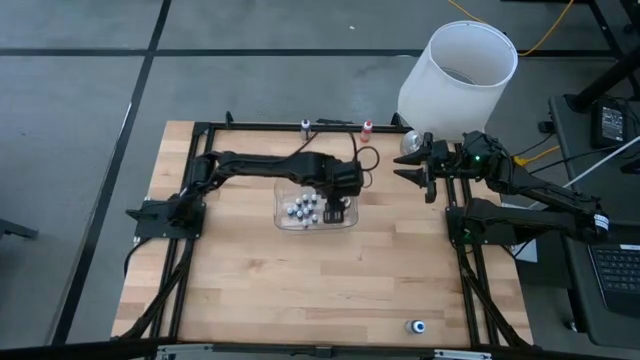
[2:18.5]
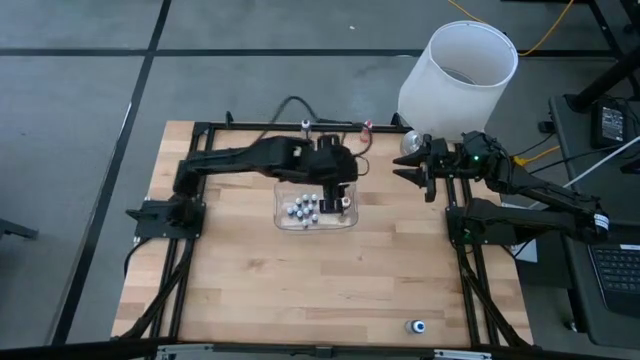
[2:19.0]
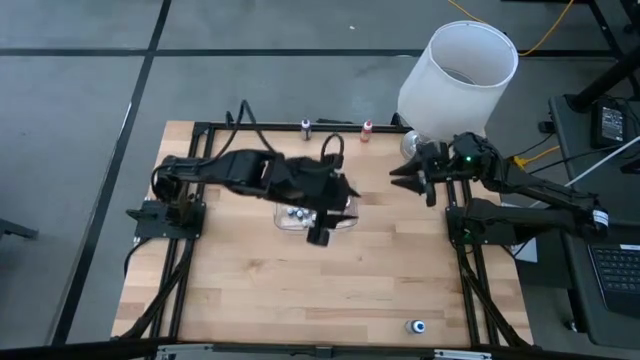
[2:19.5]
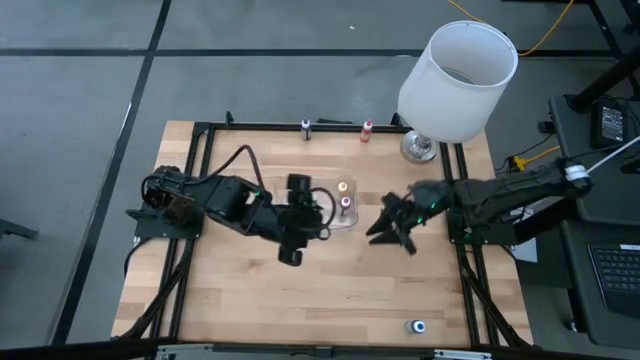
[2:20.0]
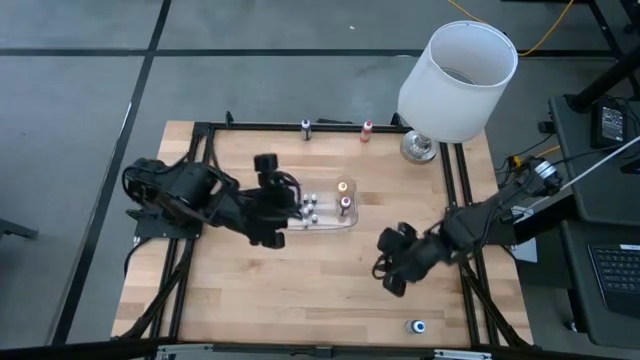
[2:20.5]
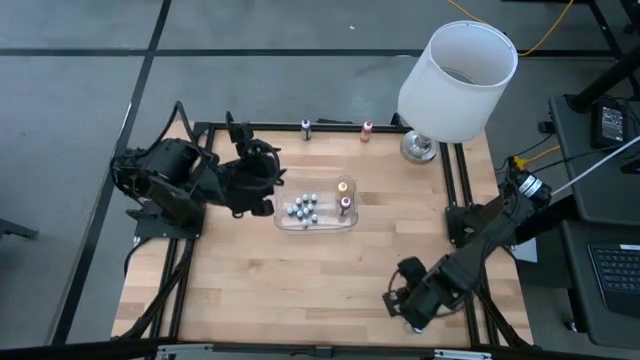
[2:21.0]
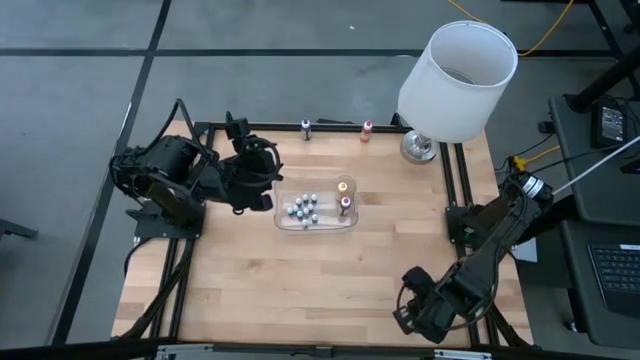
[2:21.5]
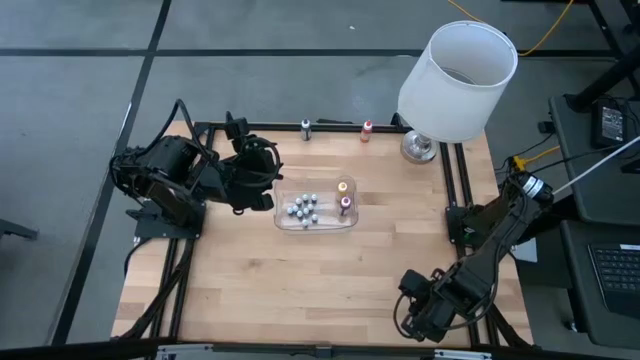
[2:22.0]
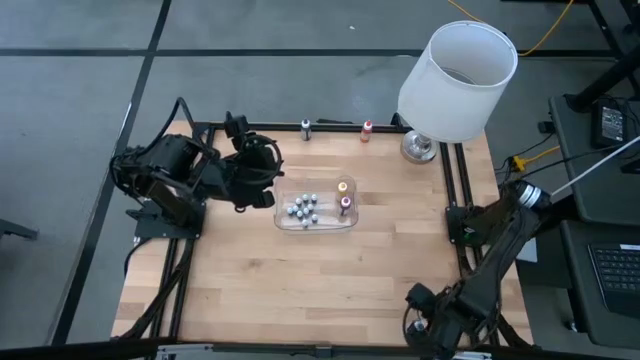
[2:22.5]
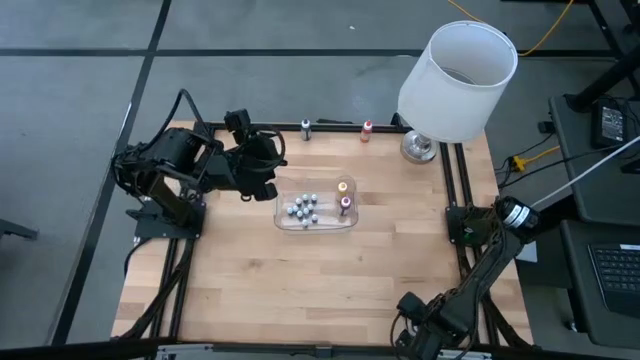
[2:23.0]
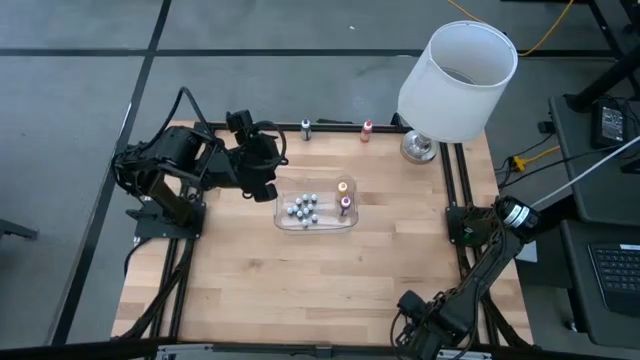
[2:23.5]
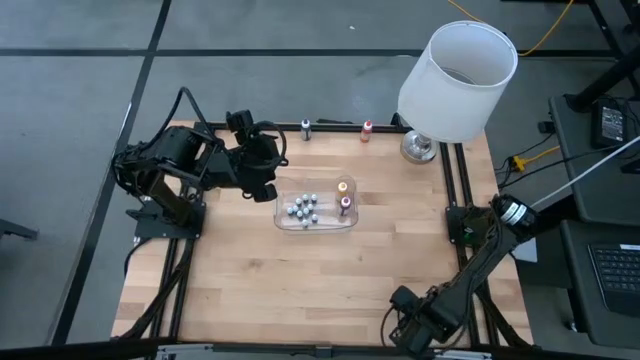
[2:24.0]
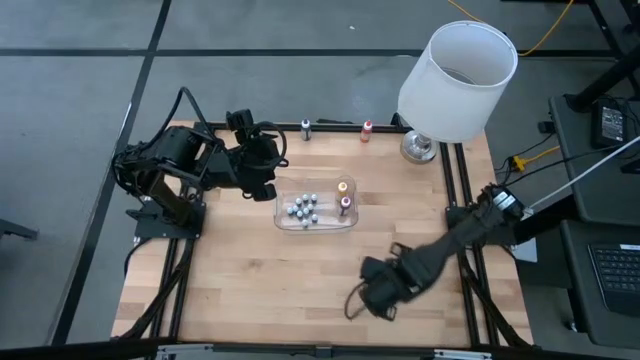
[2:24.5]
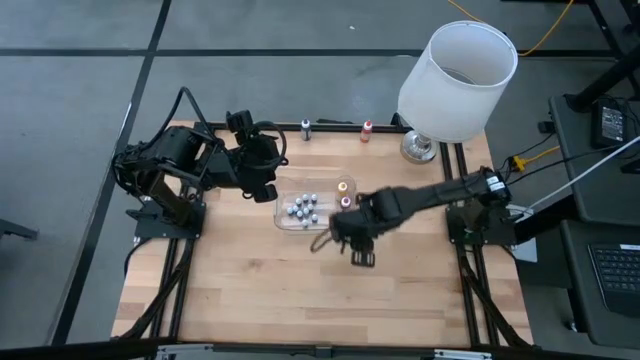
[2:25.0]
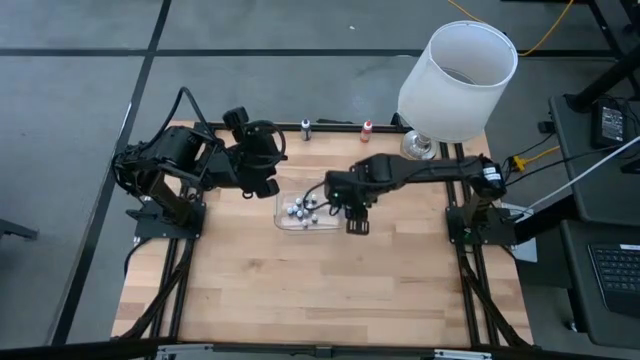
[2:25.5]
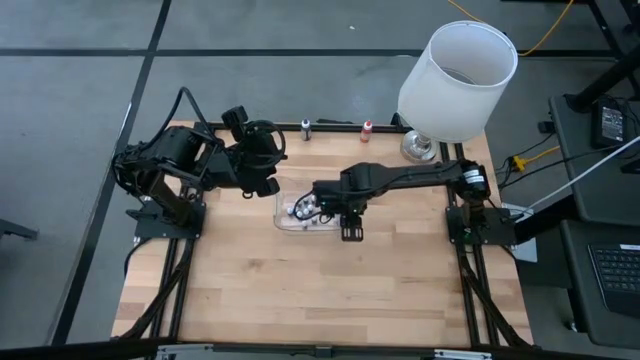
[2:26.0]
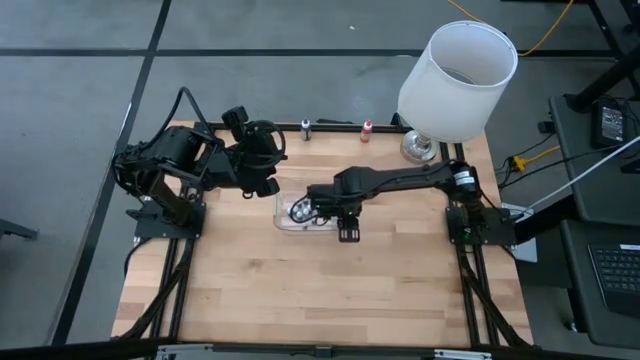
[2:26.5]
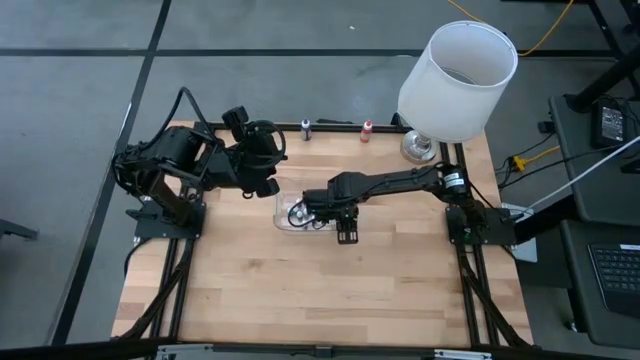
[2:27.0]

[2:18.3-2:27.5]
Task: Pick & Place food coloring
Put the large blue food coloring bottle into the transparent bin

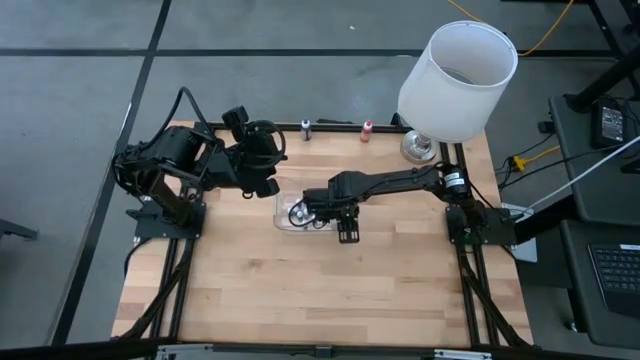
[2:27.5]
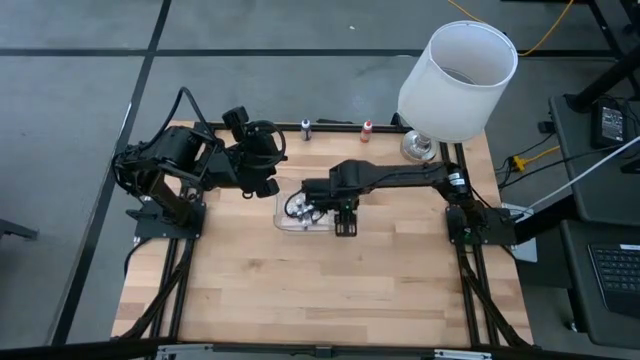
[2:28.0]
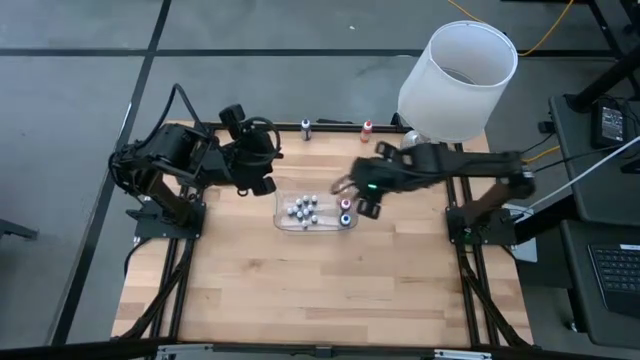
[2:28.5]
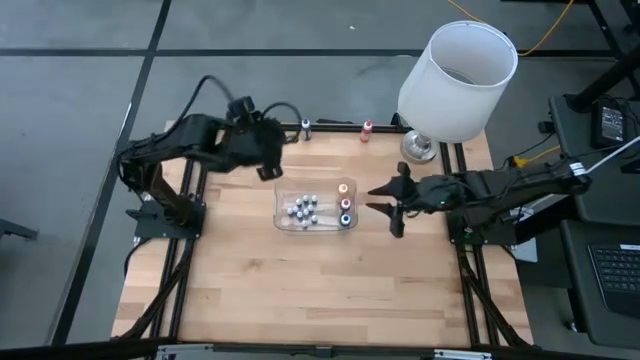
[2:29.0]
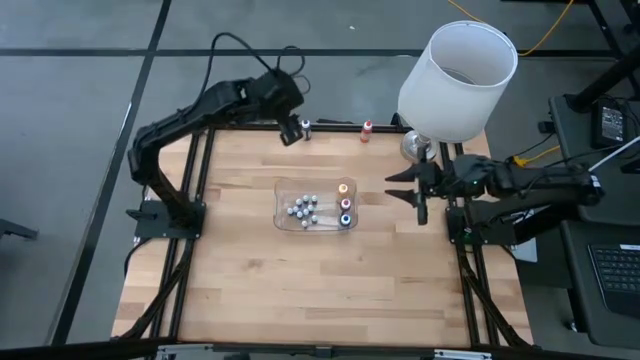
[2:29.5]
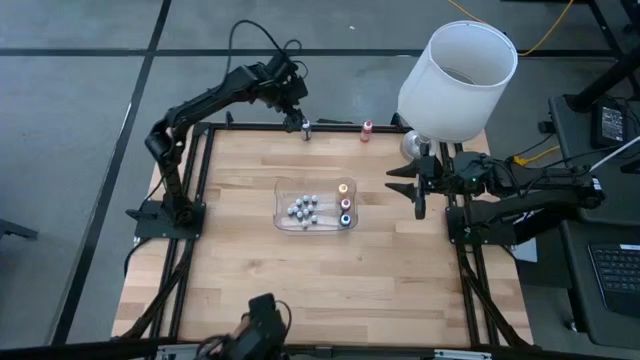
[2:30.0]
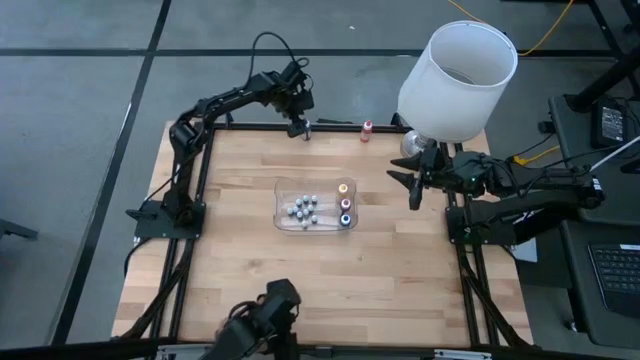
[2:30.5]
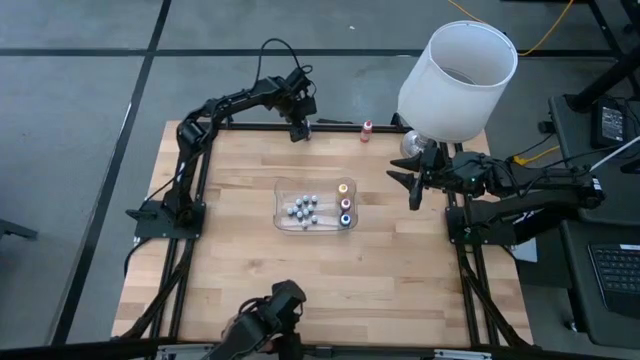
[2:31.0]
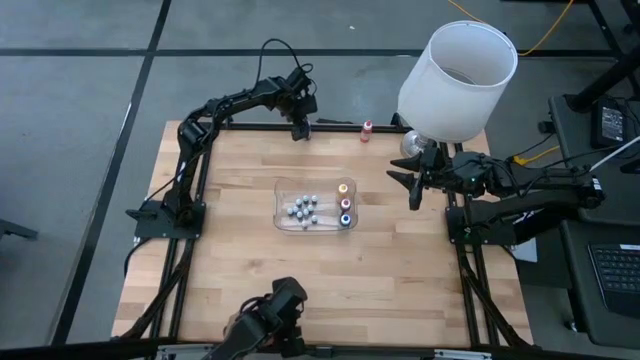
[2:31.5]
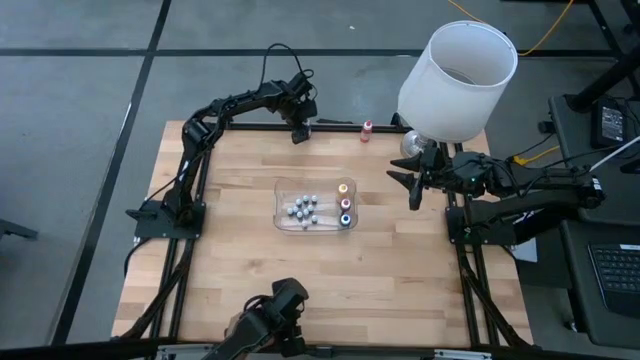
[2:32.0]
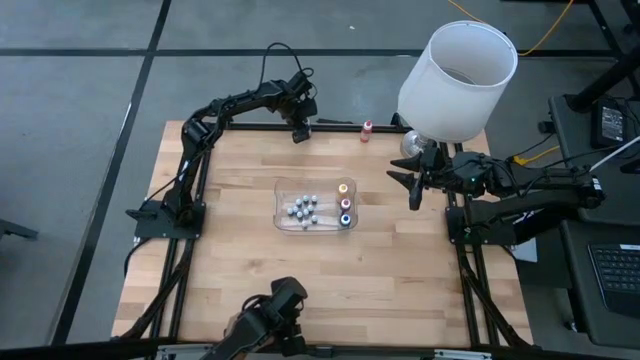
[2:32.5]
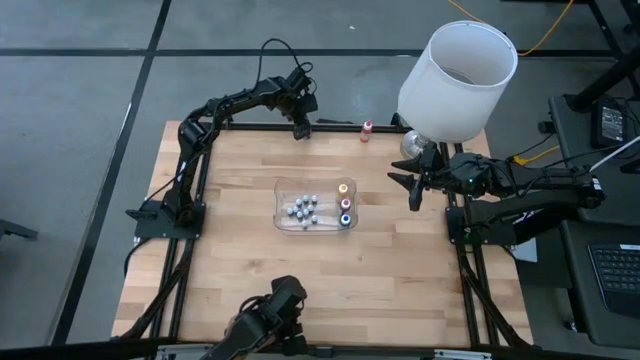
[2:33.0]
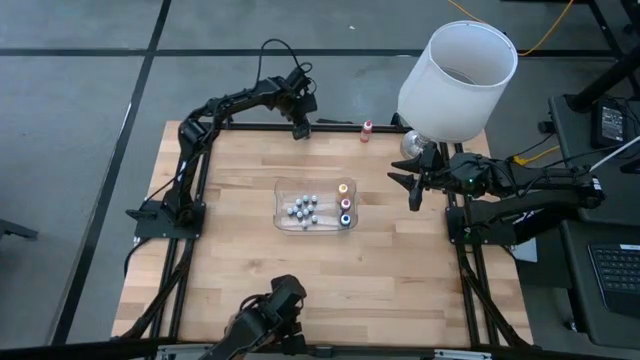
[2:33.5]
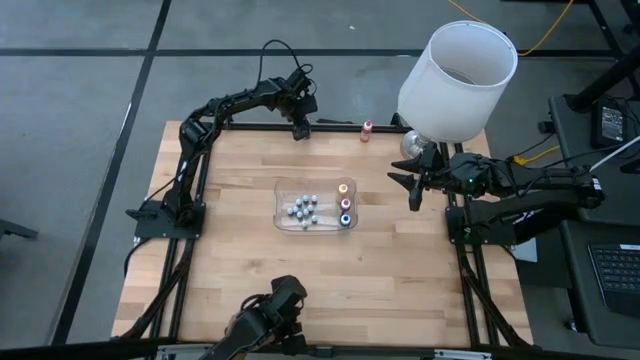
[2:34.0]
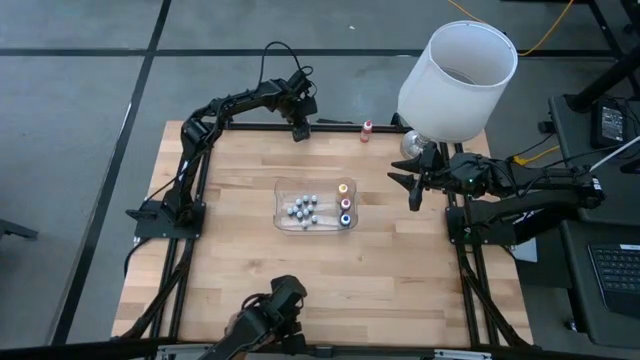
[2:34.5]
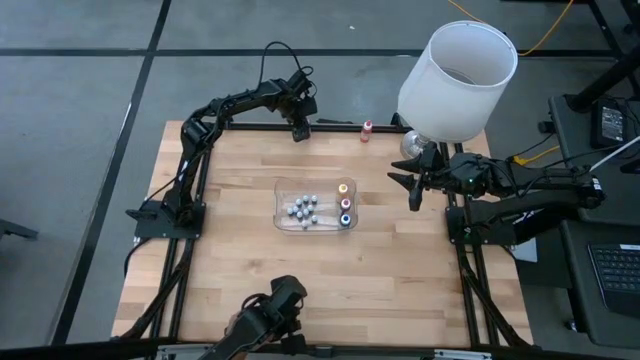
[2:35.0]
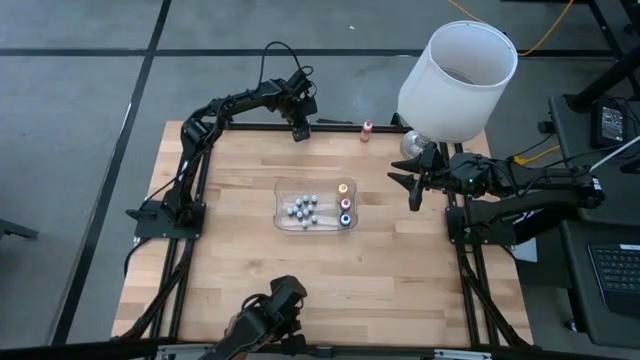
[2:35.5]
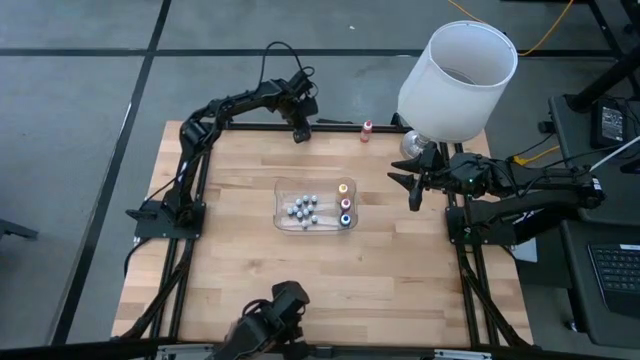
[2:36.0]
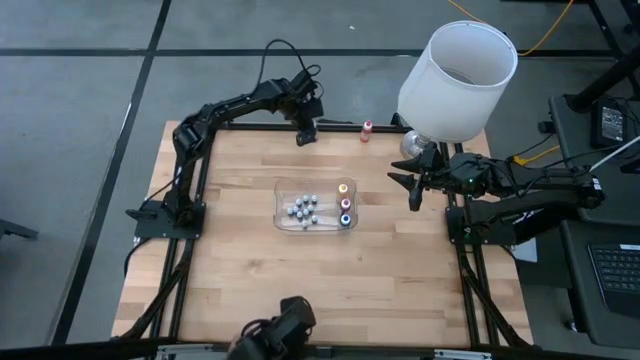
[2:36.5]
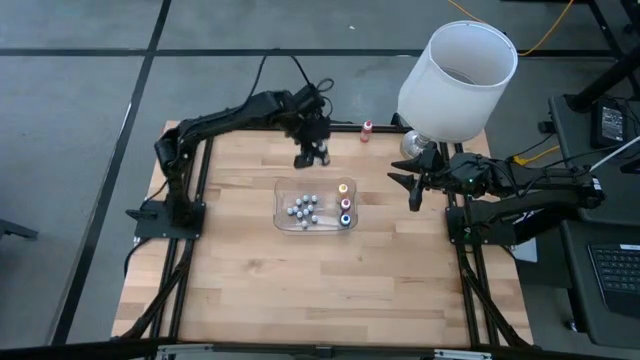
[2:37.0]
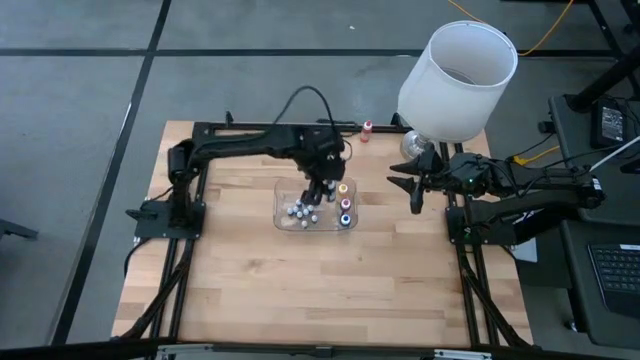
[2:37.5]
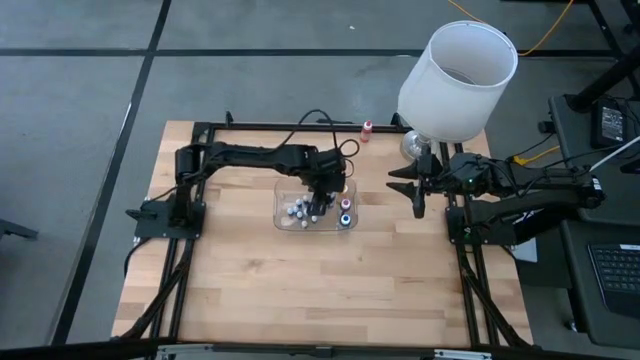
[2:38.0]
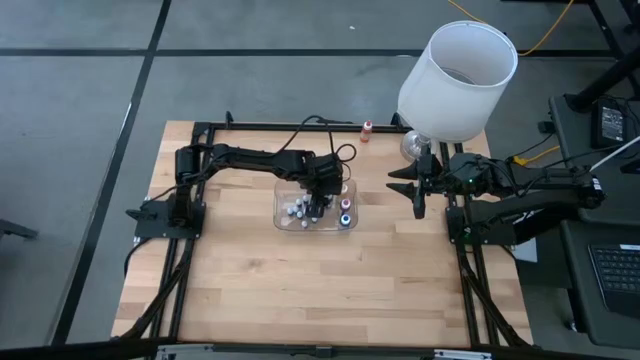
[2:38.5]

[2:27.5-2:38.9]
Put the large violet food coloring bottle into the transparent bin

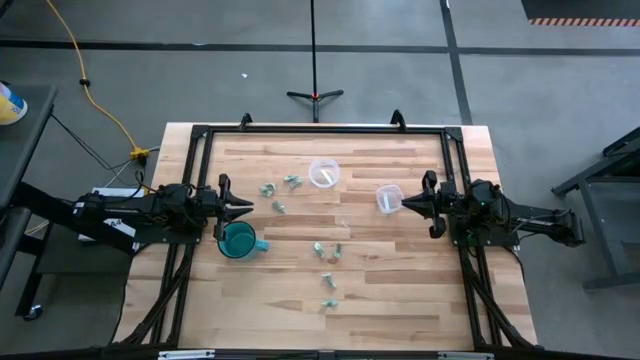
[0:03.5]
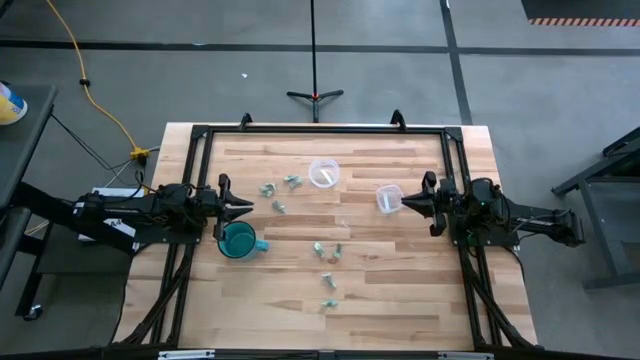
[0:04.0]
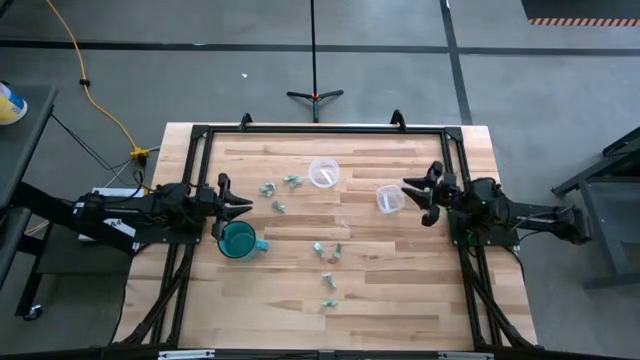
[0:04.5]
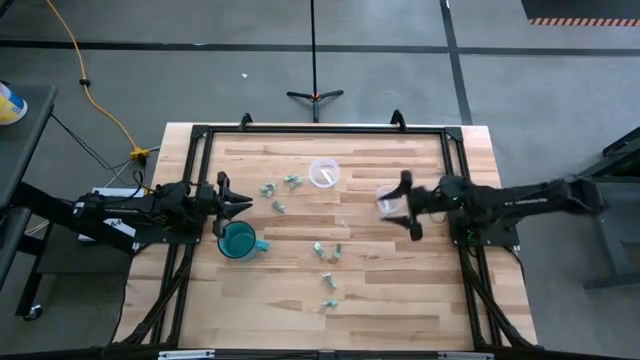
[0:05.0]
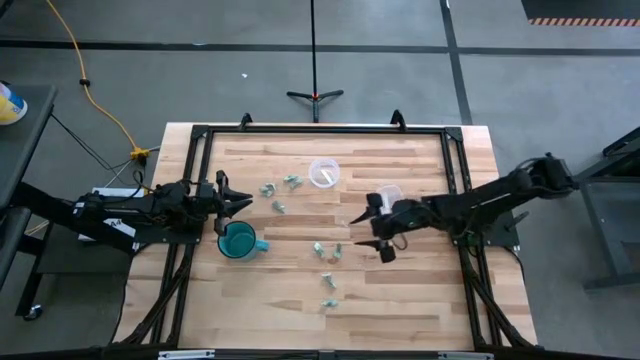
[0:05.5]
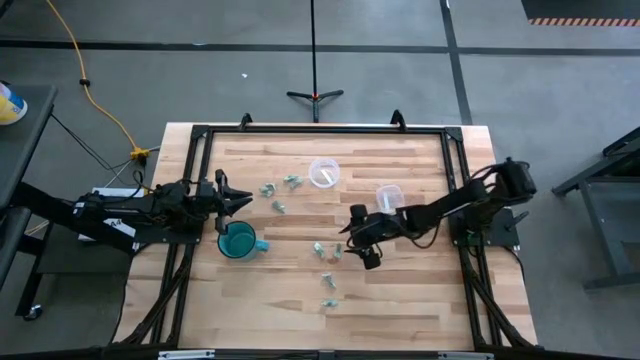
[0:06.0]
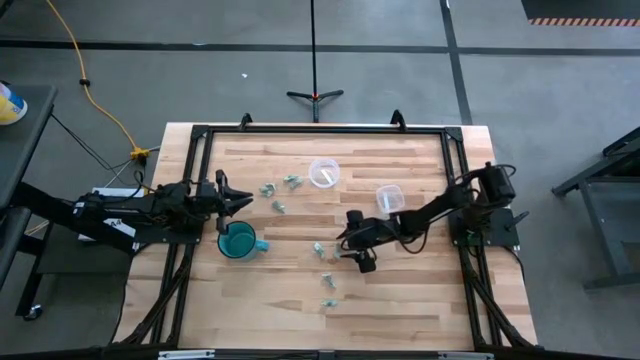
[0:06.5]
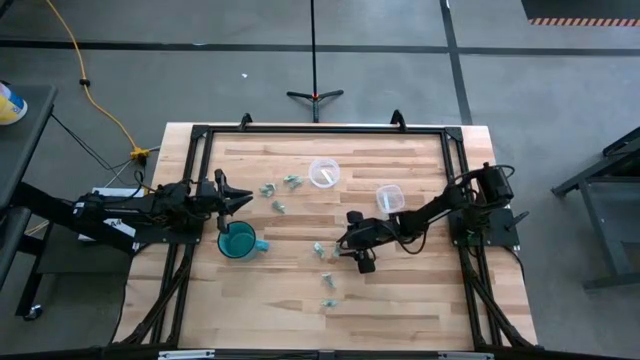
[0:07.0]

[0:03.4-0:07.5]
Task: Pick and place items into bin
Put the stevia packet into the bottom transparent bin
